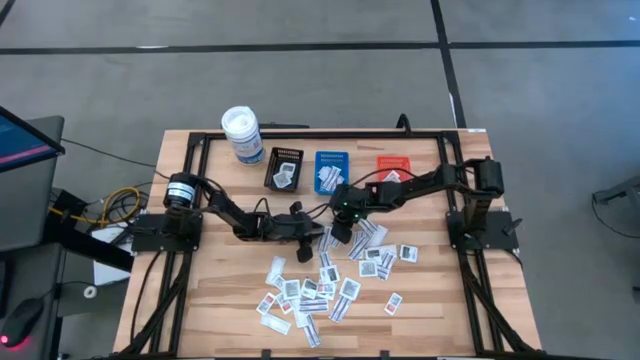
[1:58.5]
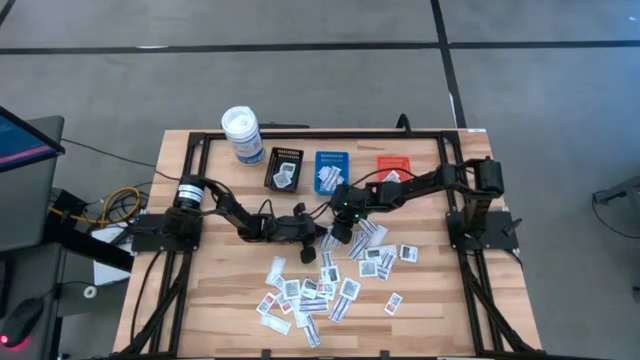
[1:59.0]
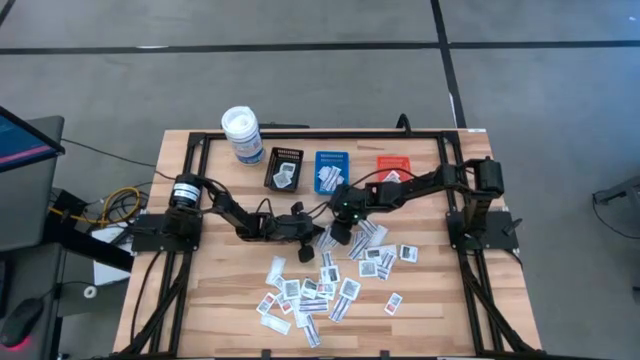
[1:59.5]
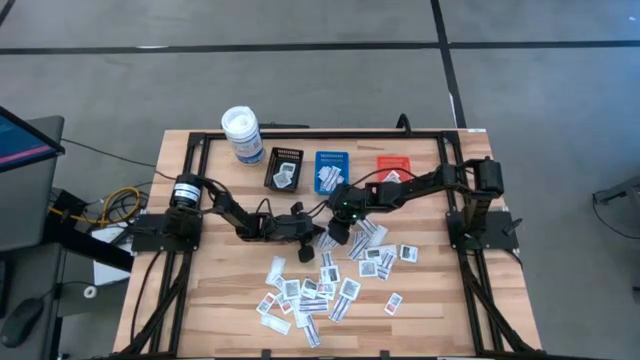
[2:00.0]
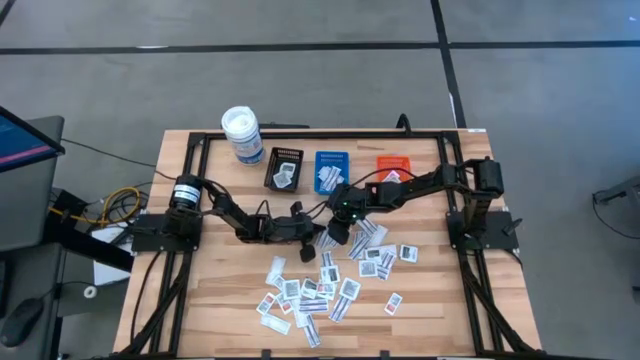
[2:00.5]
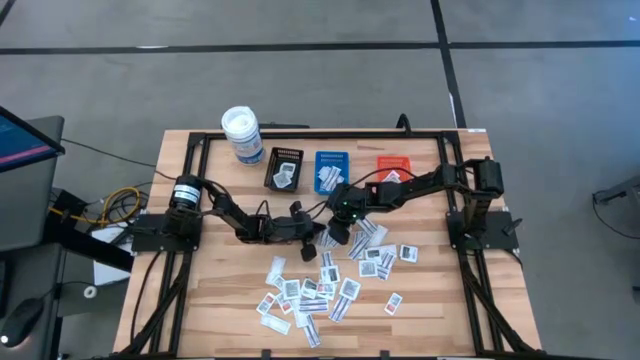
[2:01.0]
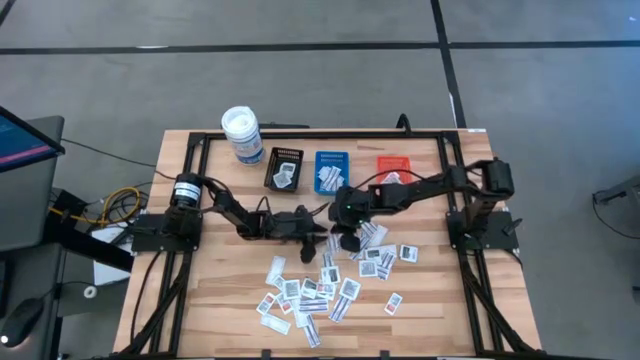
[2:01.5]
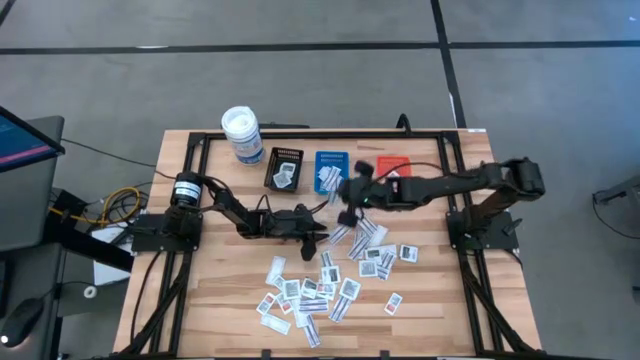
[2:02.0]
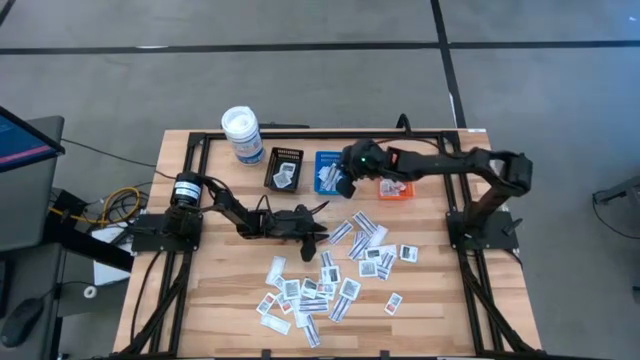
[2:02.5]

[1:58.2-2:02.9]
Task: Pick & Place First Aid Supplies
Put the blue bandage into the blue bin

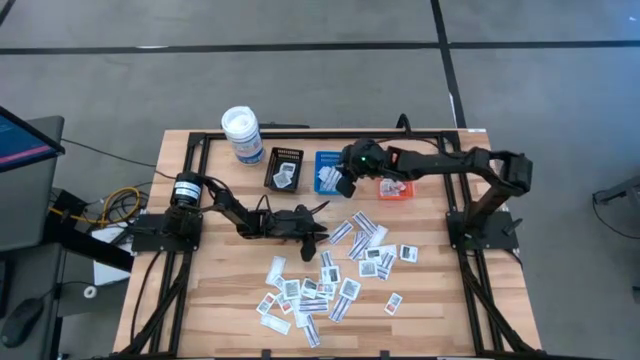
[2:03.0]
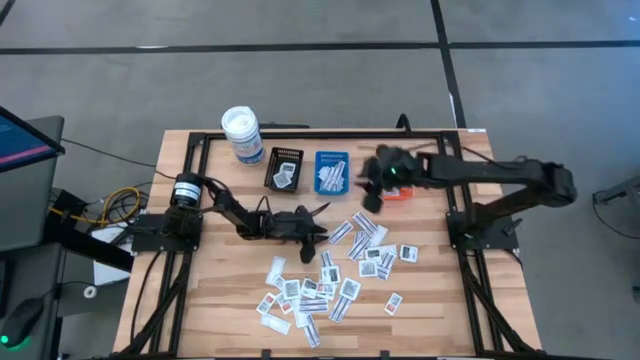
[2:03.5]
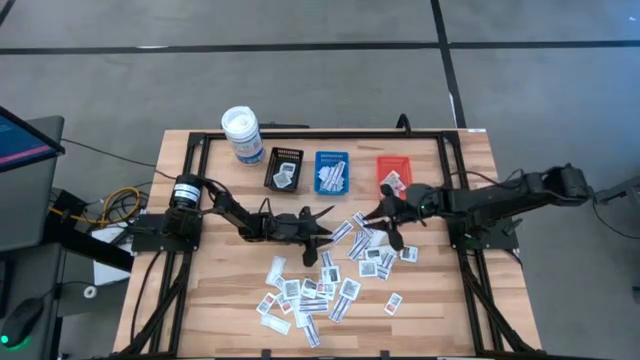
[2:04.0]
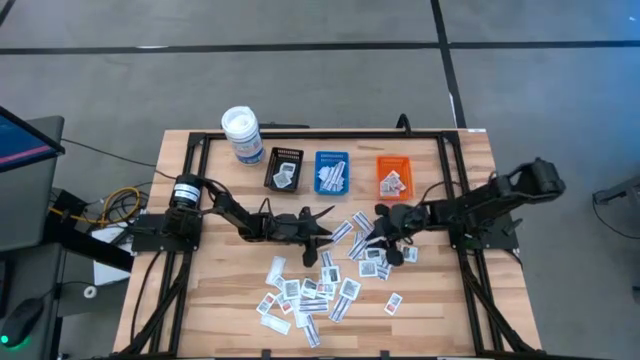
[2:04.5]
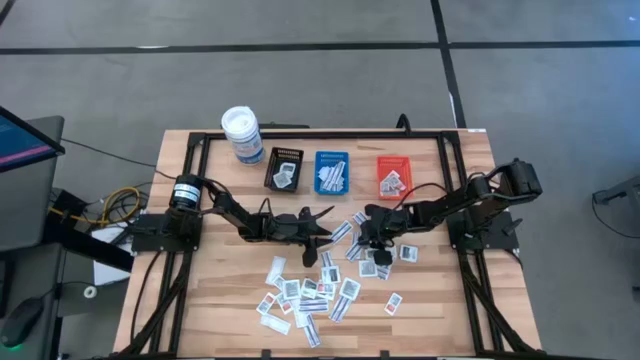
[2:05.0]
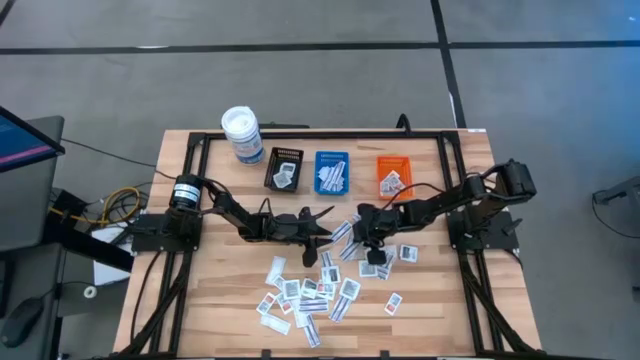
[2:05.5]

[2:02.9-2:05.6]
Put the blue bandage into the blue bin

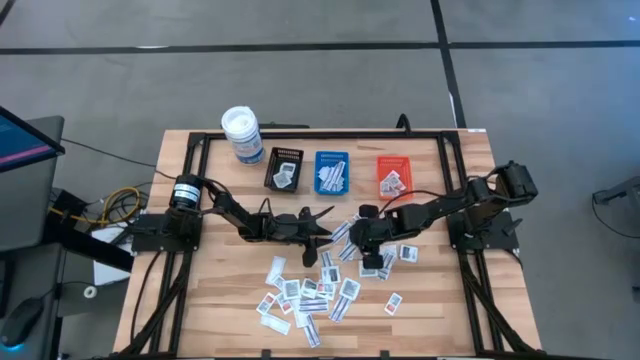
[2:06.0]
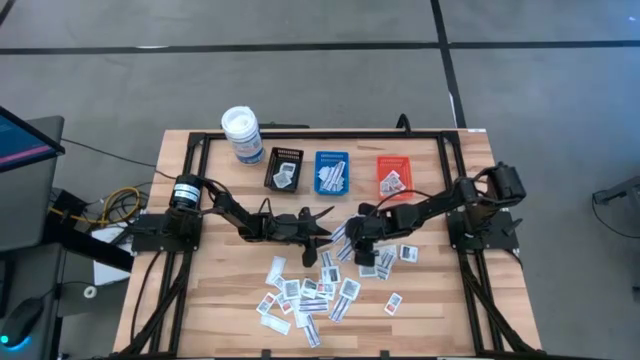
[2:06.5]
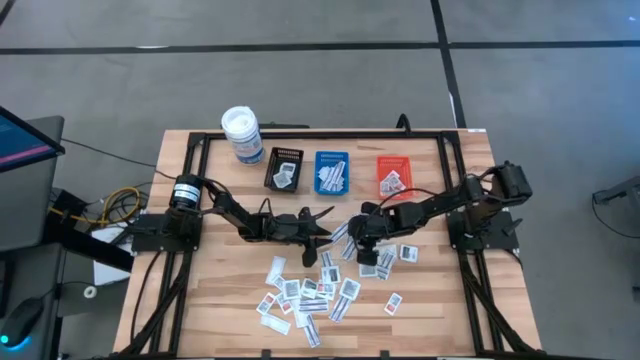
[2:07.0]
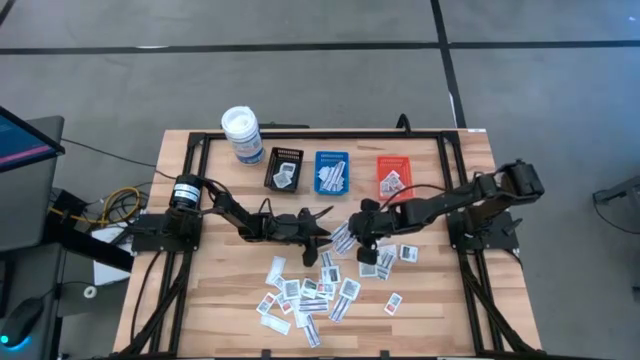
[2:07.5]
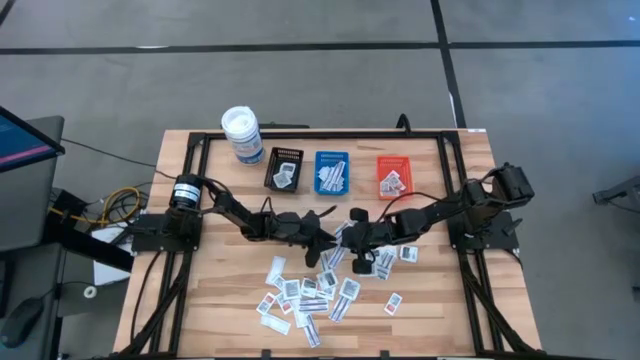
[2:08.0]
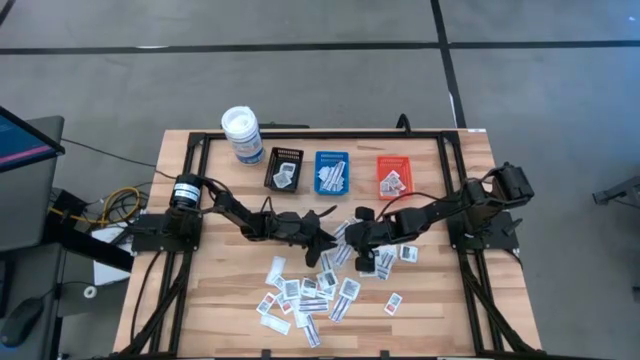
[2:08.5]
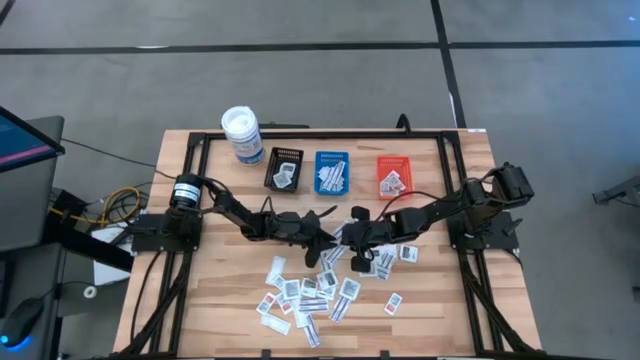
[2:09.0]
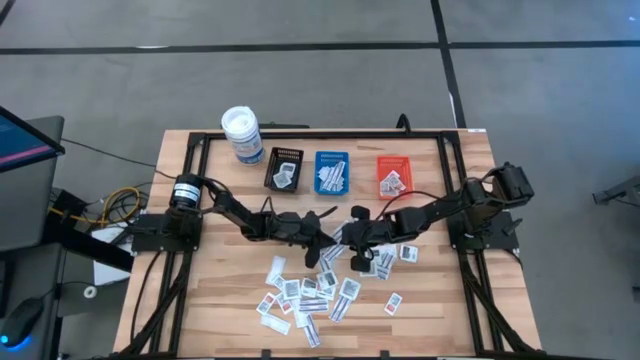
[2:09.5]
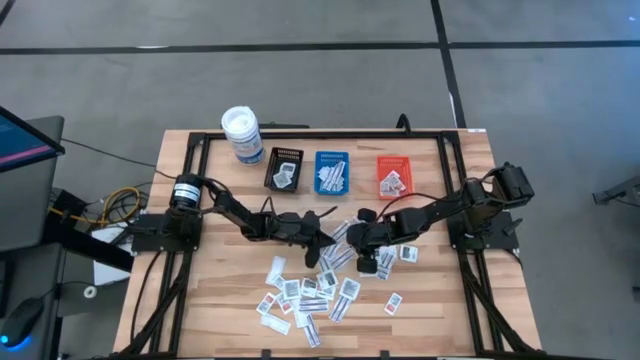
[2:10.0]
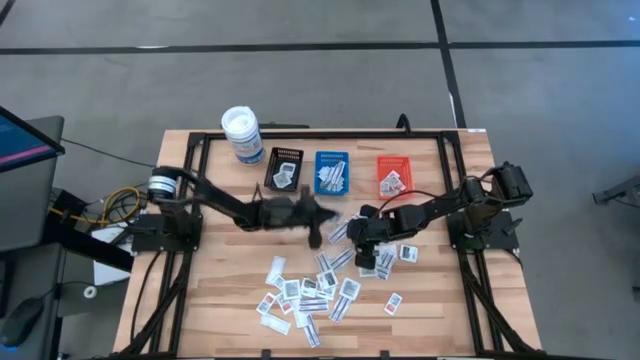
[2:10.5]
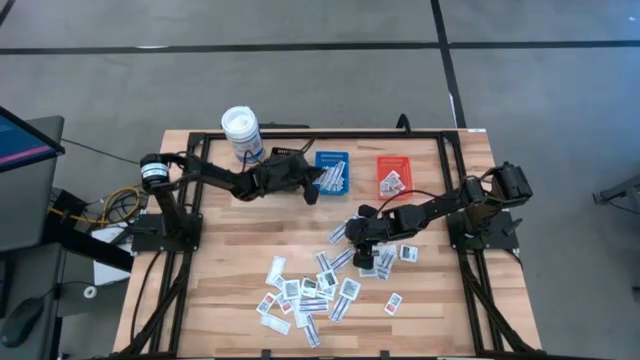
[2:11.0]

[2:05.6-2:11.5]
Put the blue bandage into the blue bin

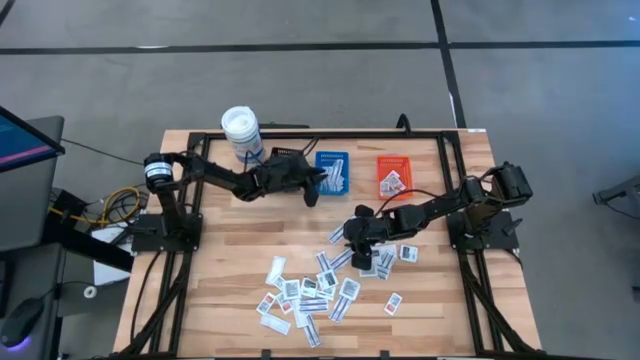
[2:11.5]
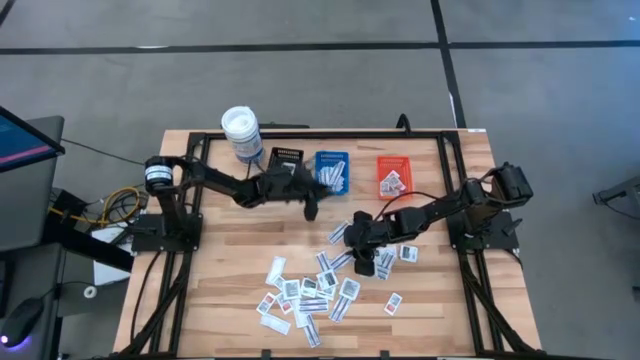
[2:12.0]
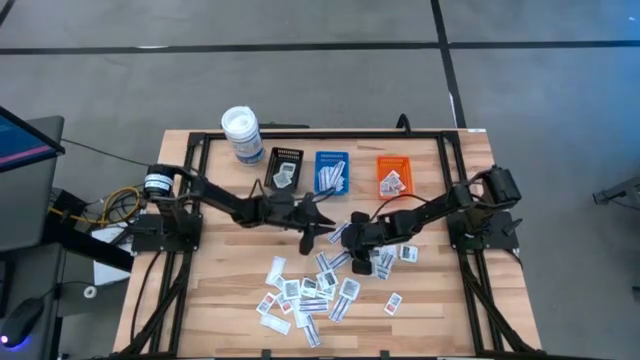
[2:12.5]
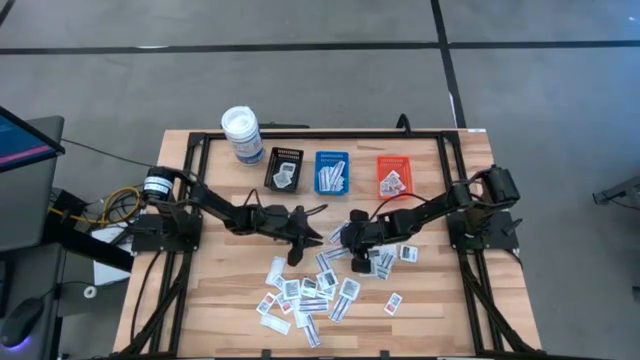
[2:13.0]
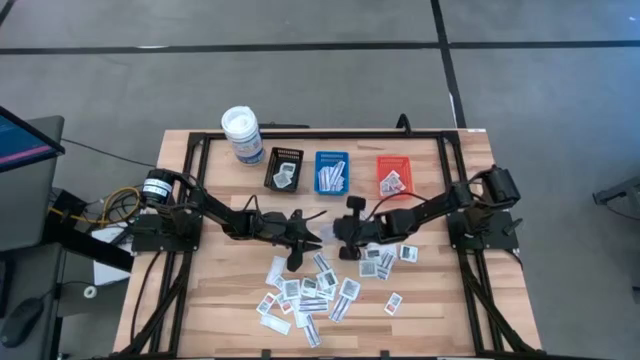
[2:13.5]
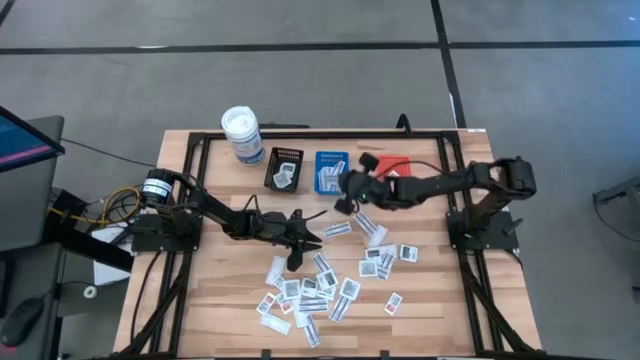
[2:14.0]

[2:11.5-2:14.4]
Put the blue bandage into the blue bin

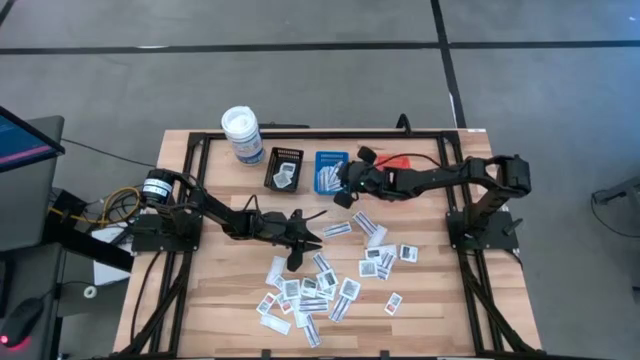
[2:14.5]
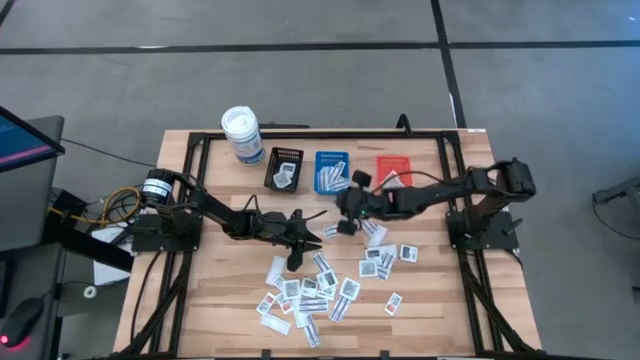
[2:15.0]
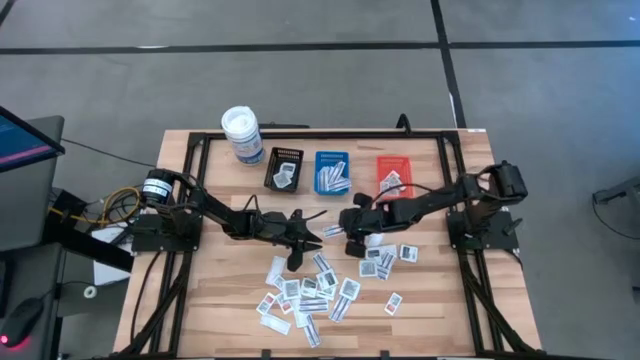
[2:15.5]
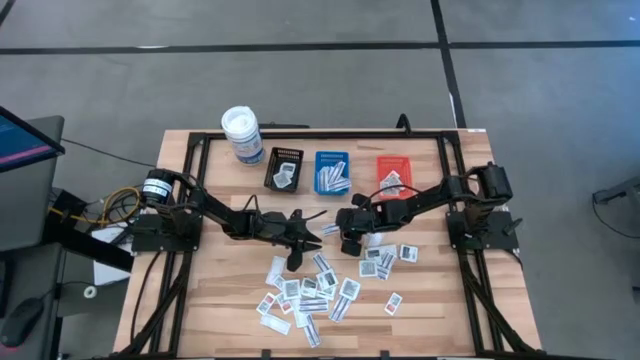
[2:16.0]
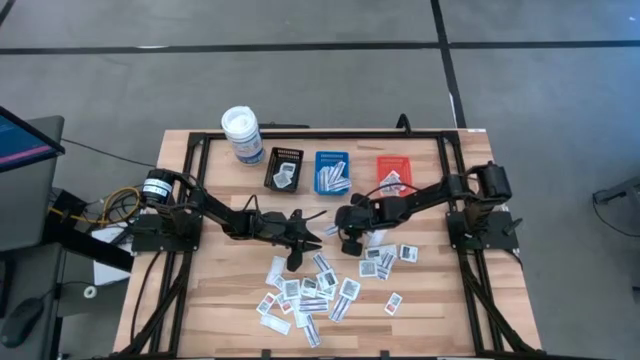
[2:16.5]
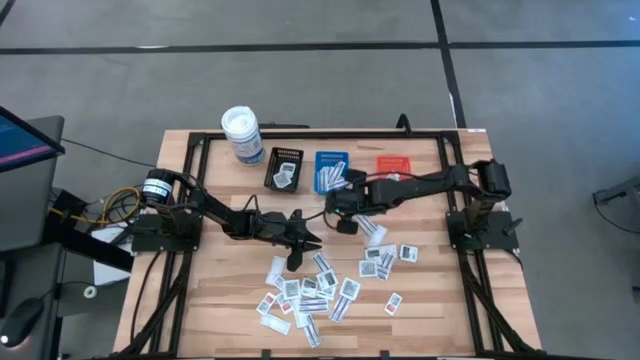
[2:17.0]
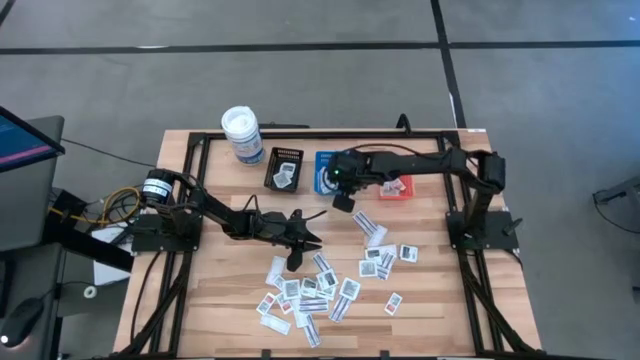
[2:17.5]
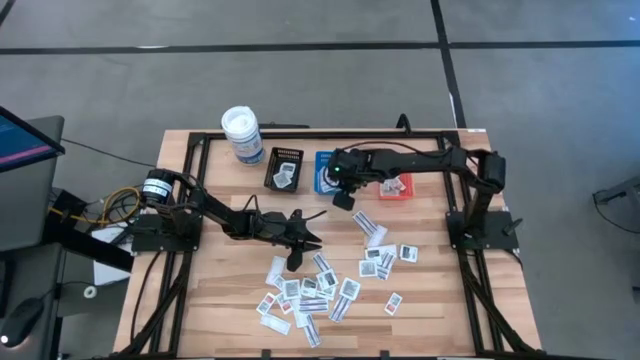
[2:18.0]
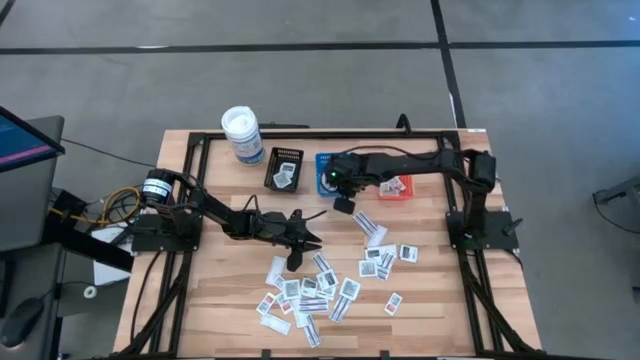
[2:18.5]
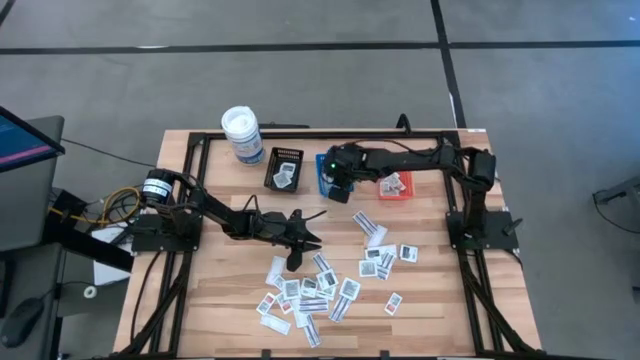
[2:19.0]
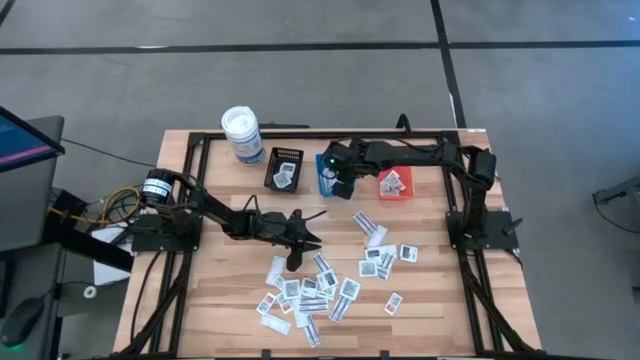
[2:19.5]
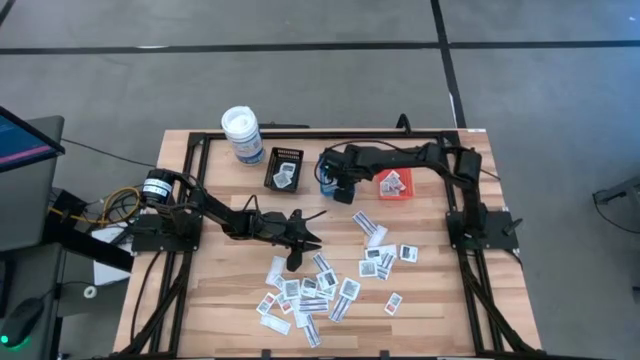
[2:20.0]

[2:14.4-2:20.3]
Put the blue bandage into the blue bin
